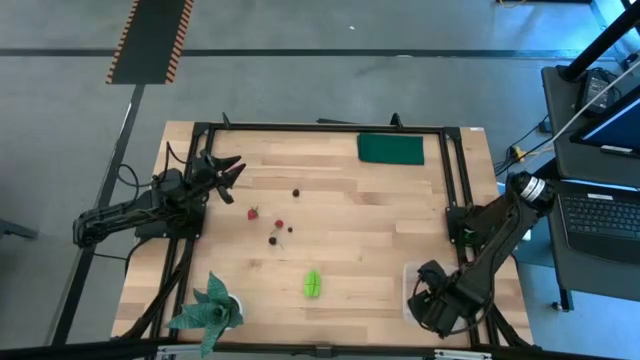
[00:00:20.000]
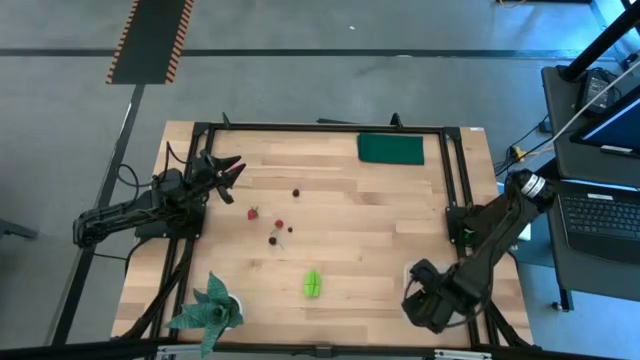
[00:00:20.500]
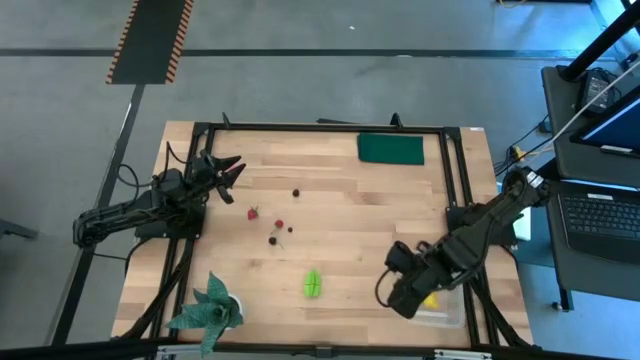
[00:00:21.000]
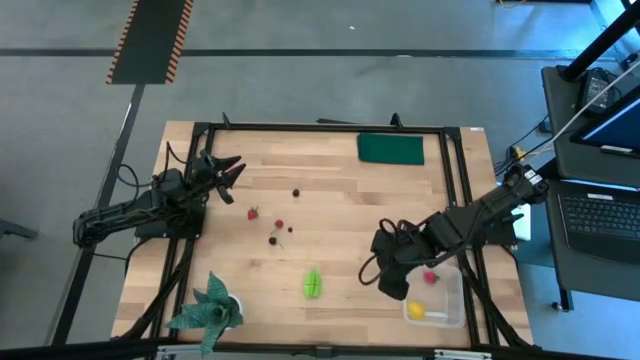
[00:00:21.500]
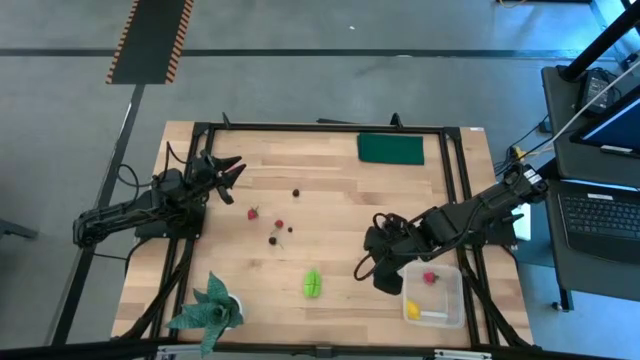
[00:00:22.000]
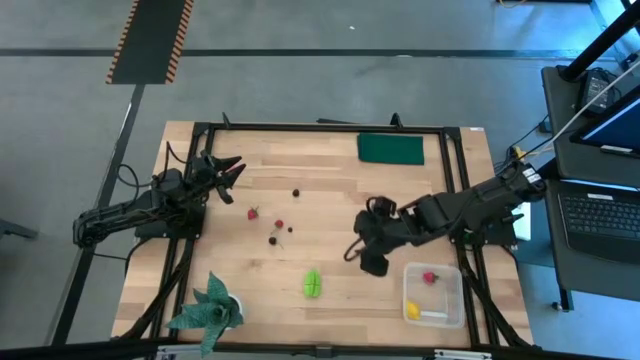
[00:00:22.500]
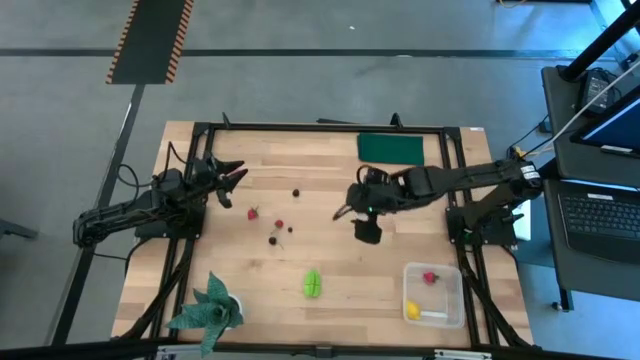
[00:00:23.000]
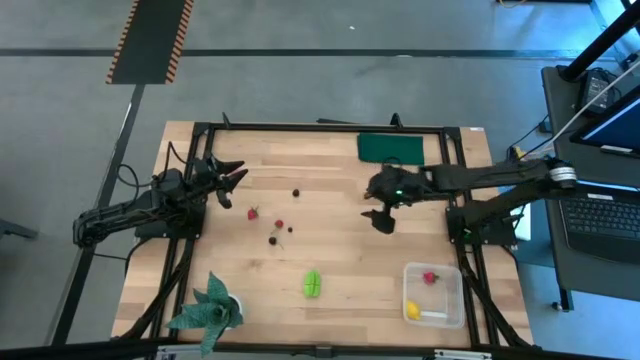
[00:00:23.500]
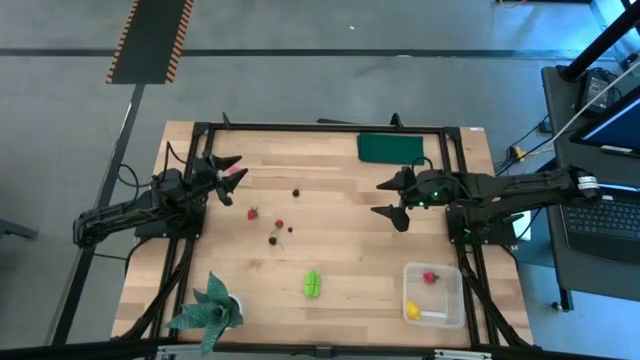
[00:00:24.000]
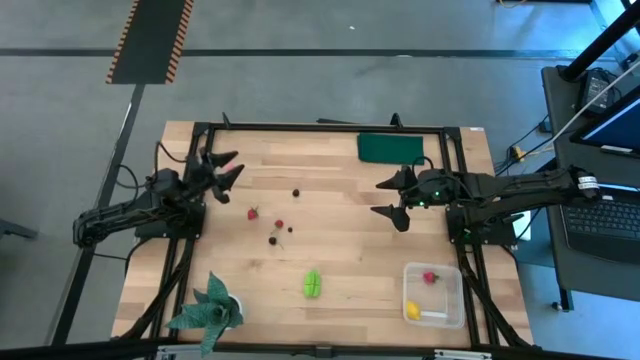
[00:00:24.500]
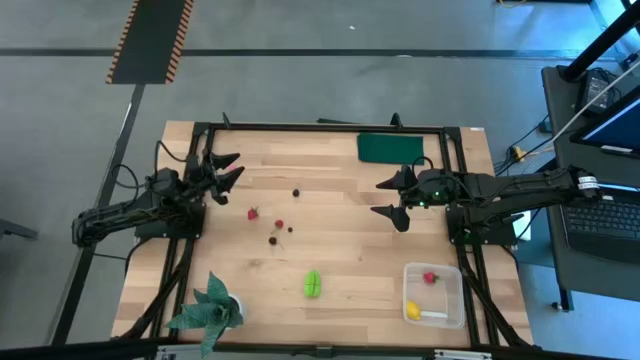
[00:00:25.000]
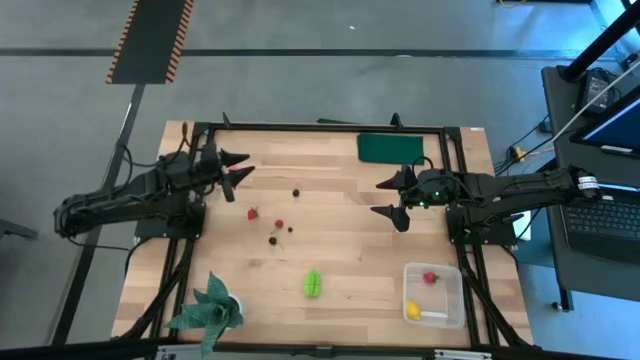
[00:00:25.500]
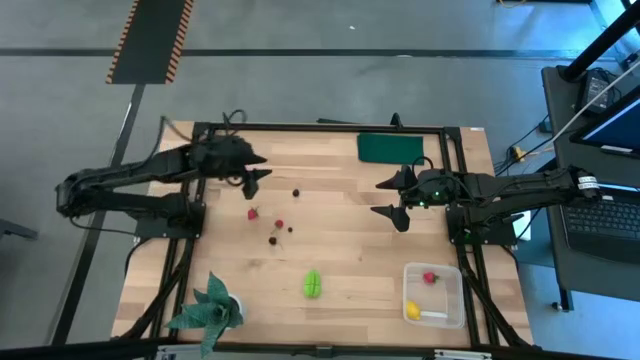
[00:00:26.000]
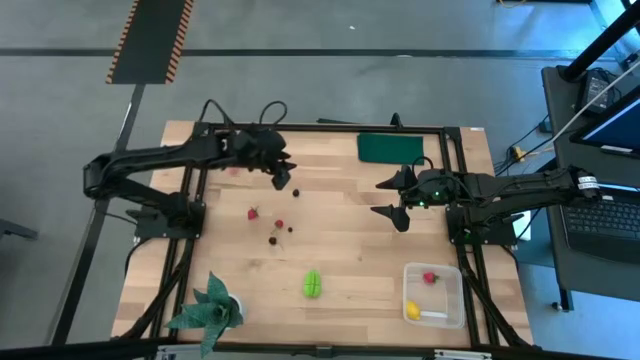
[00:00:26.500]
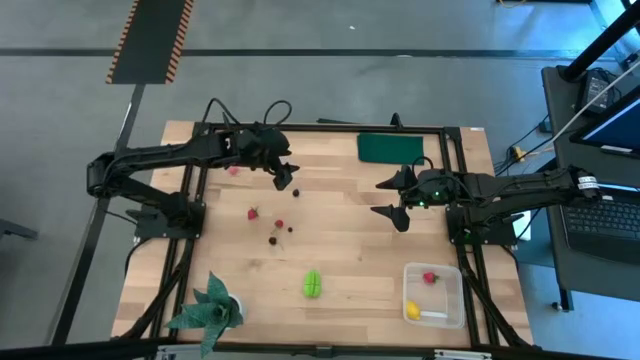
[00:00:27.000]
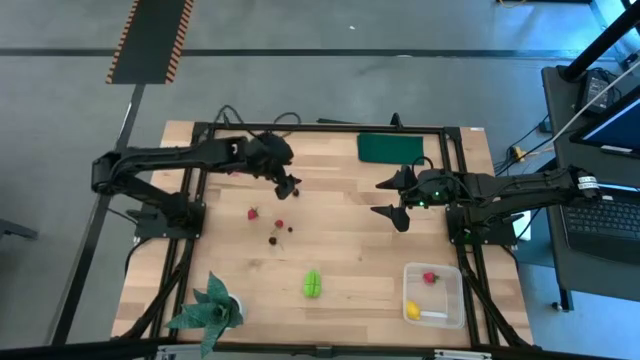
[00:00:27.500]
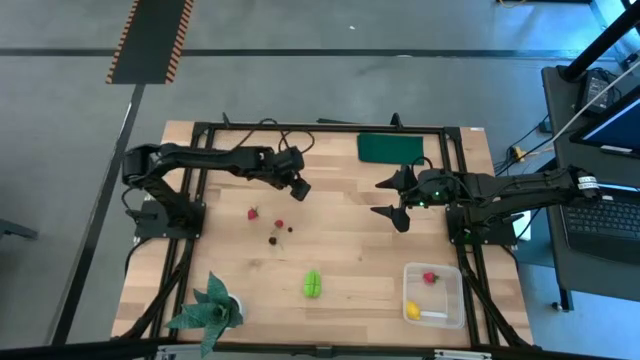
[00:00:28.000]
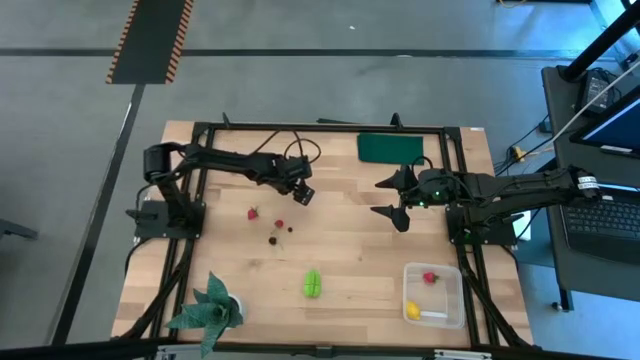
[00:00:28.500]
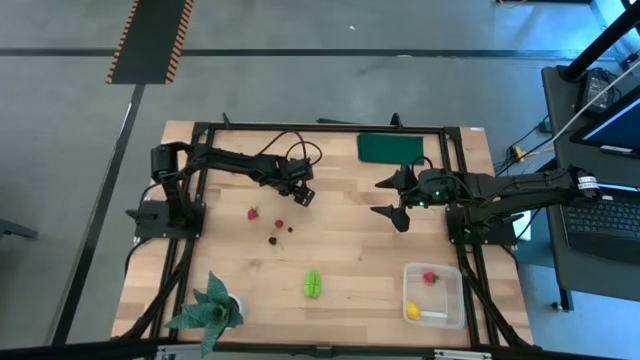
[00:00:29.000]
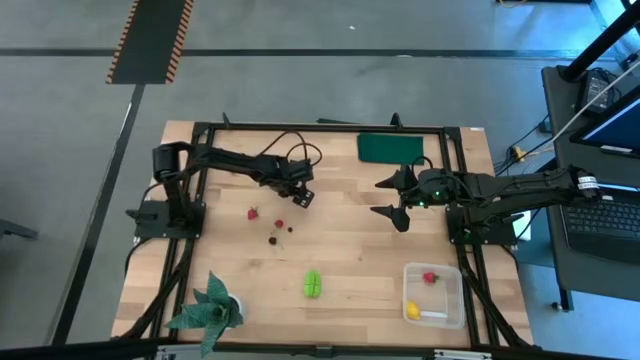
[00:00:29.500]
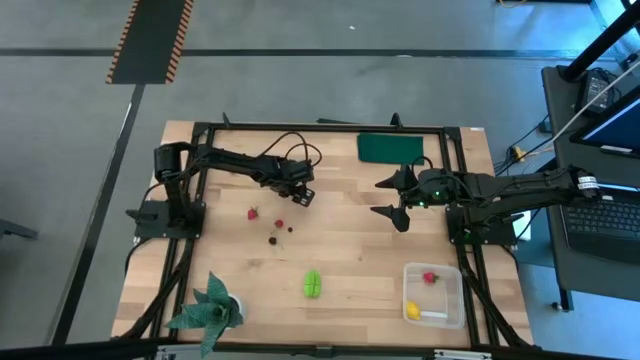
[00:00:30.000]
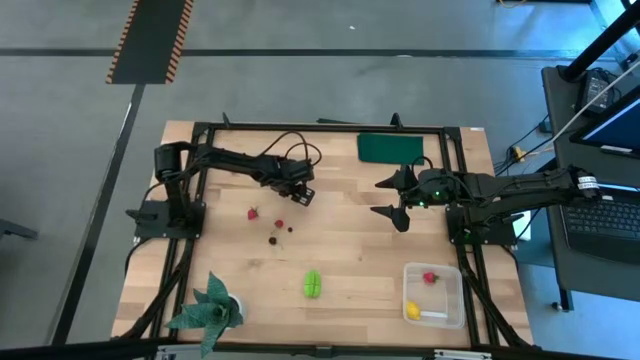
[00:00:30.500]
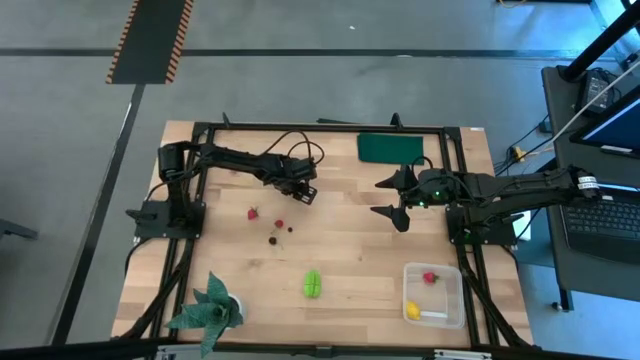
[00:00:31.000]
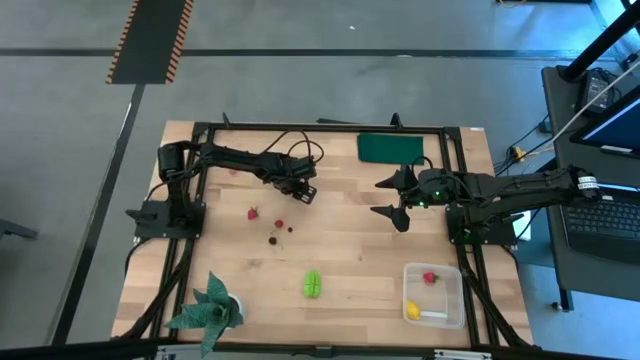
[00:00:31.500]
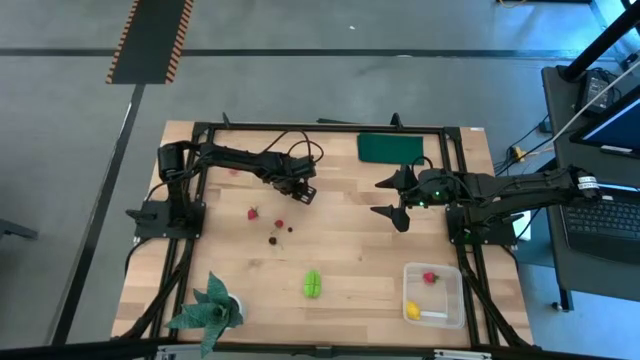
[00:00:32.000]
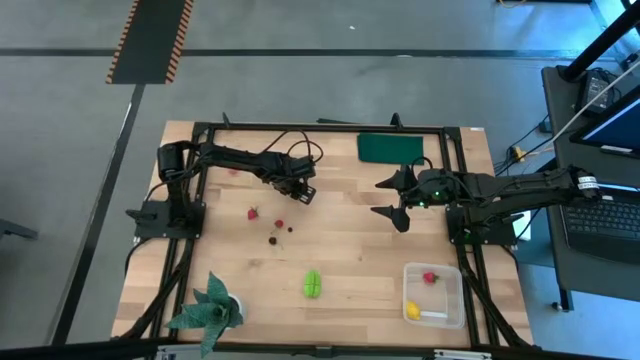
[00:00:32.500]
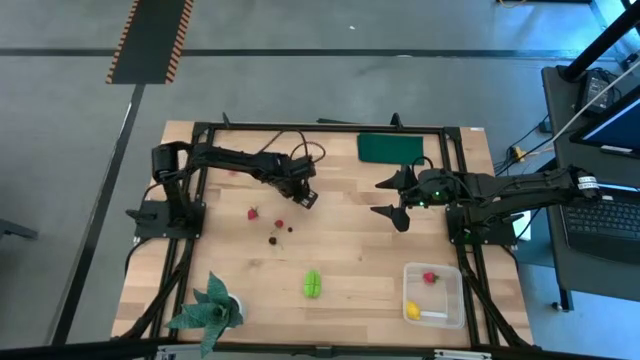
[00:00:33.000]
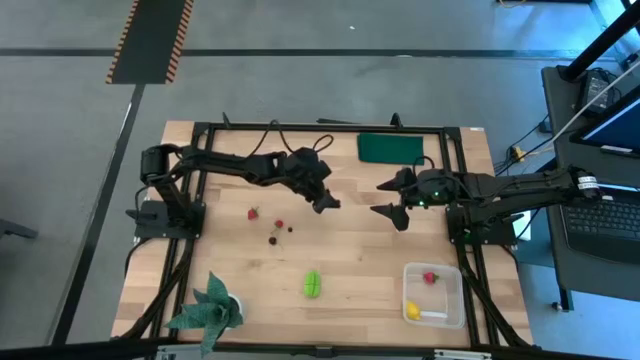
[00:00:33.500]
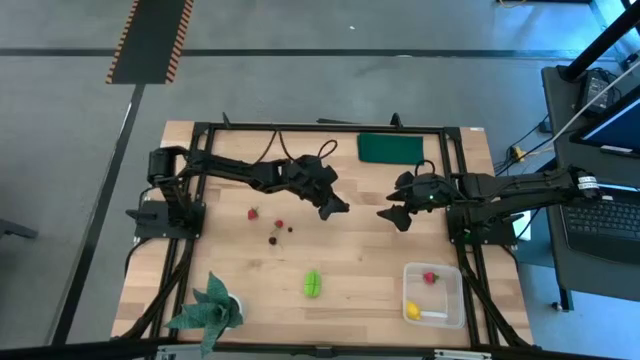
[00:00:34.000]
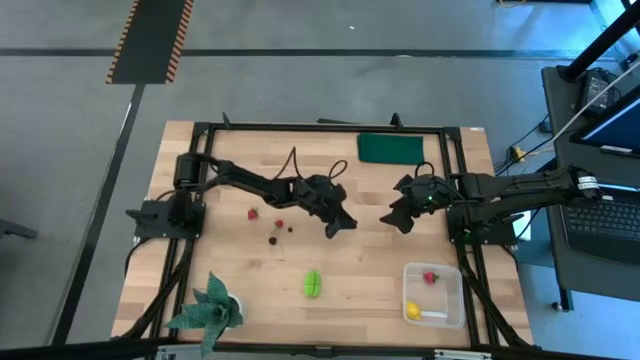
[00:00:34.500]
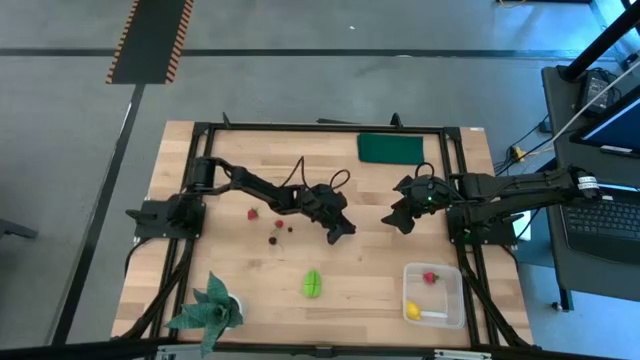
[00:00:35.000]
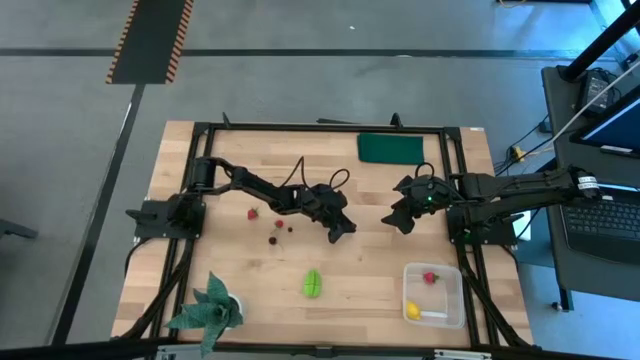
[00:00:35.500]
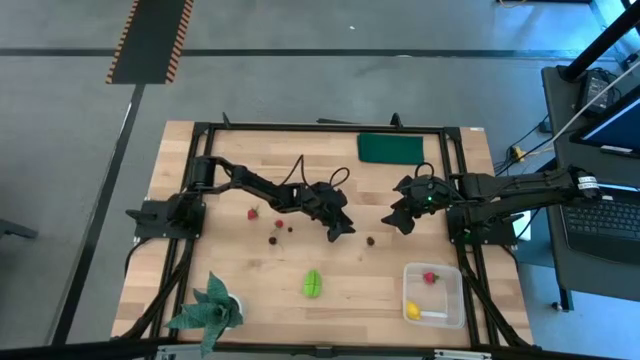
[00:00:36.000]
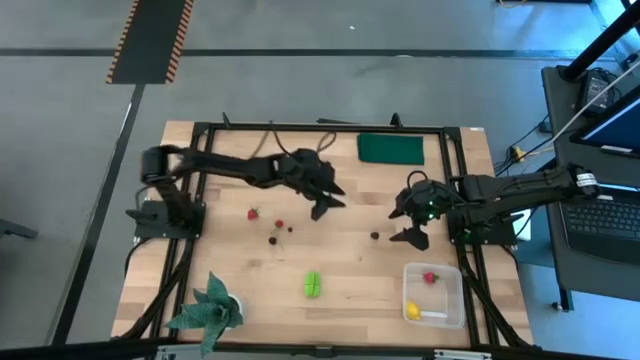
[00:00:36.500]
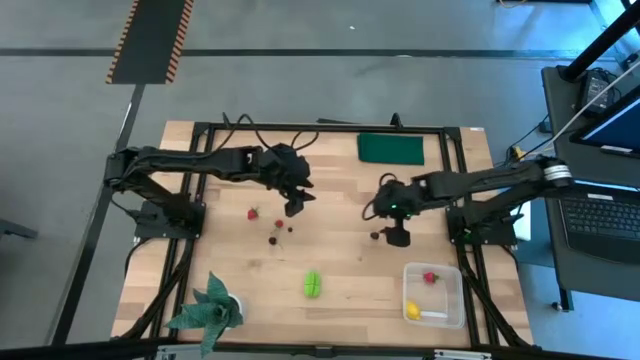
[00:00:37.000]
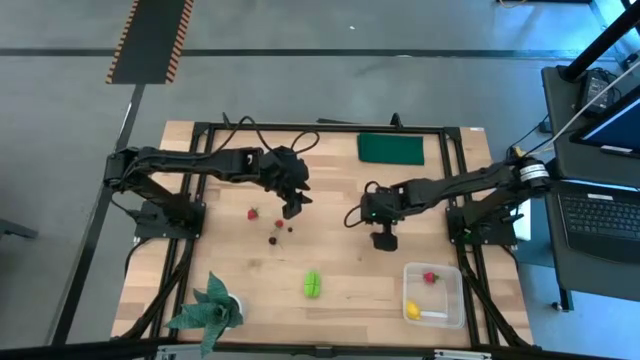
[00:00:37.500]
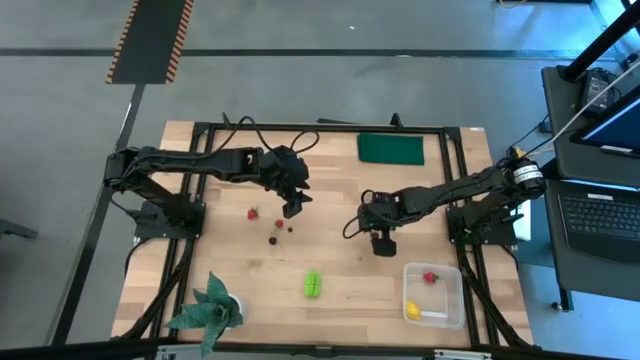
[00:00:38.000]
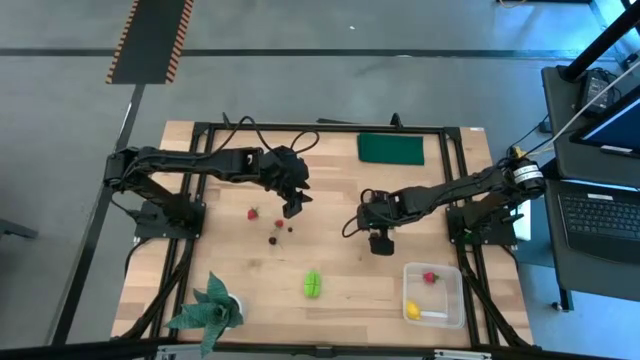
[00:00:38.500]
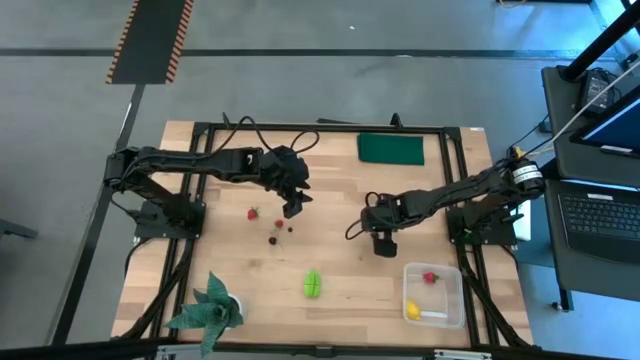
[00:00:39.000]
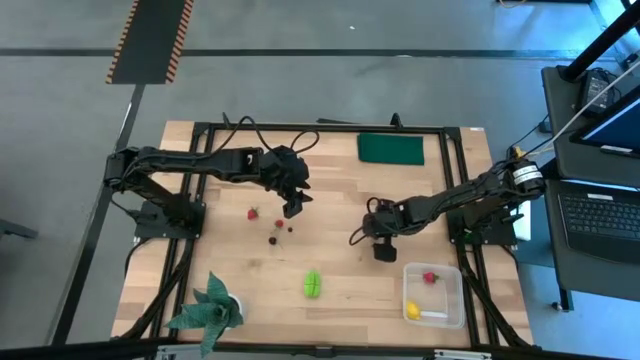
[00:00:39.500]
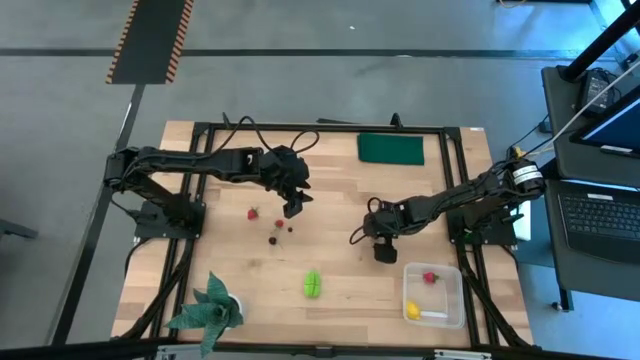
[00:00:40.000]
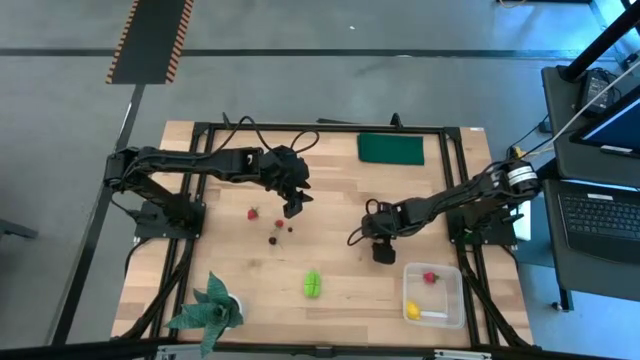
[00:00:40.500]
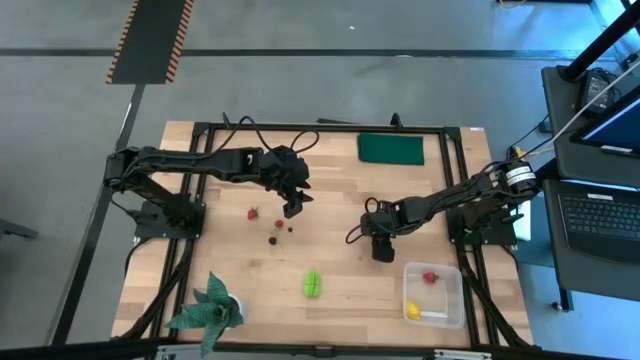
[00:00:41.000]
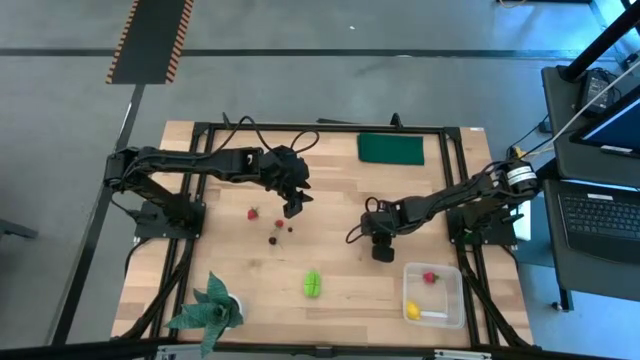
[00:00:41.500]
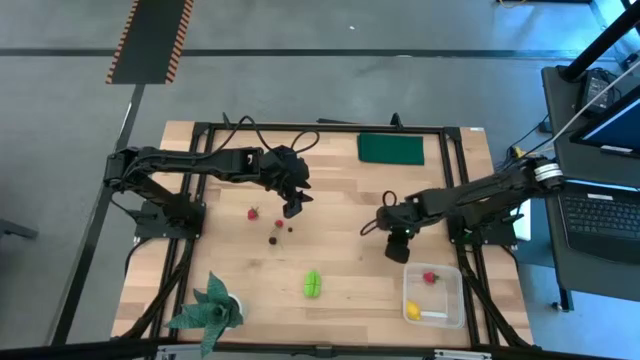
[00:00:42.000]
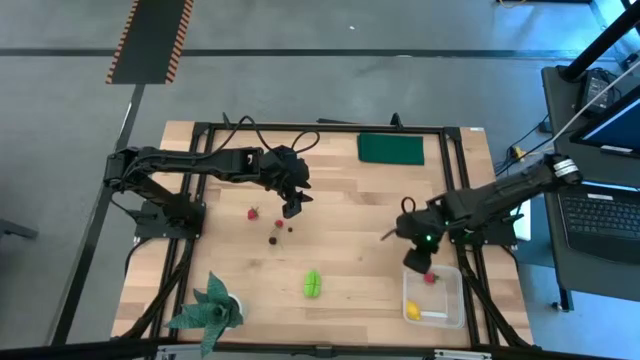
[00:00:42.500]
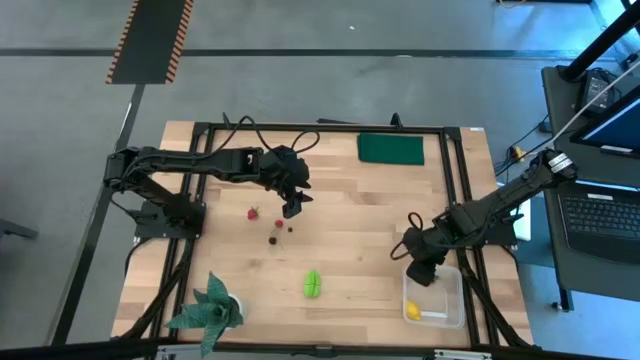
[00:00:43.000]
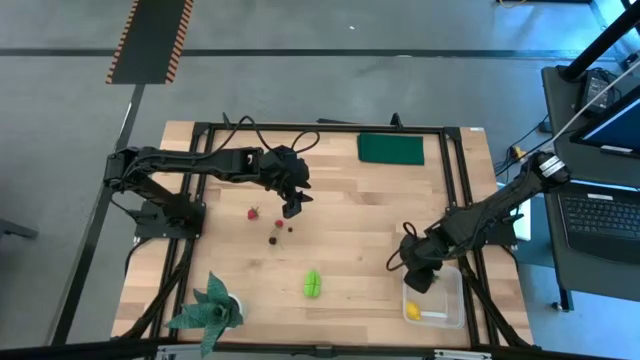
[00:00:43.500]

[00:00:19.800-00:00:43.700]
Task: Pick and placing Produce into tupperware
Put the blackberry into the transparent bin
